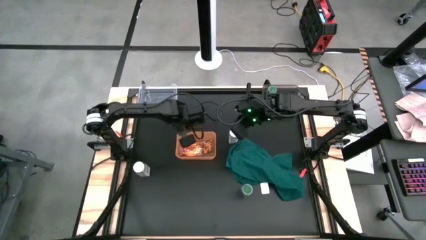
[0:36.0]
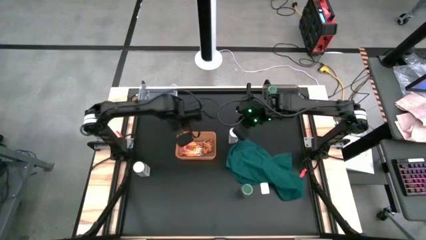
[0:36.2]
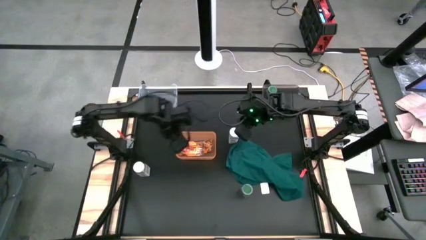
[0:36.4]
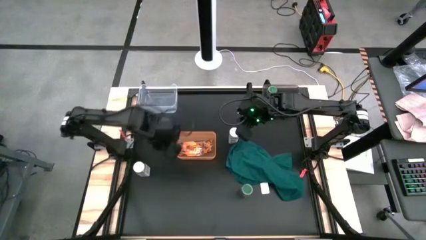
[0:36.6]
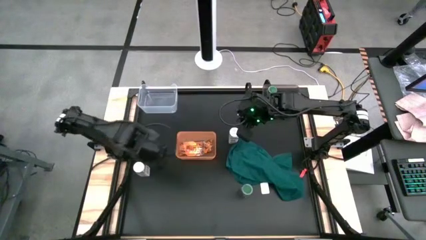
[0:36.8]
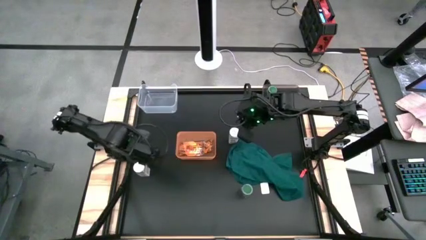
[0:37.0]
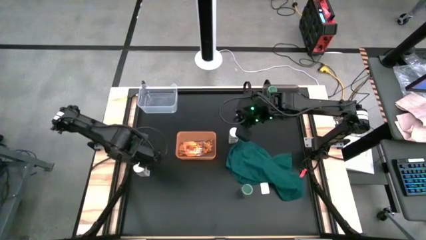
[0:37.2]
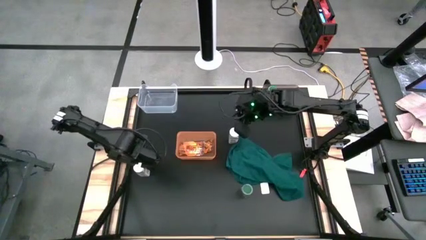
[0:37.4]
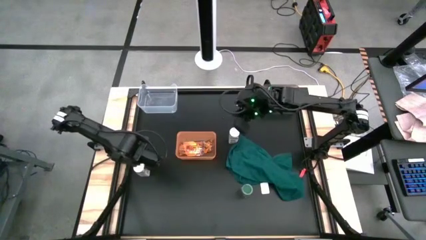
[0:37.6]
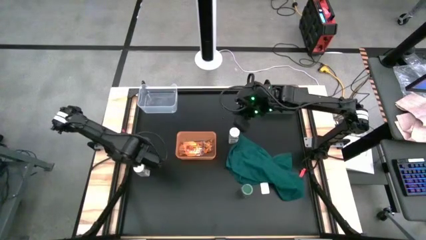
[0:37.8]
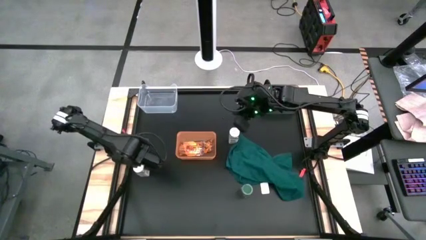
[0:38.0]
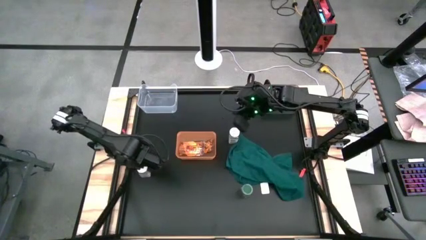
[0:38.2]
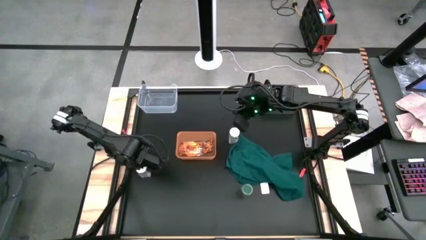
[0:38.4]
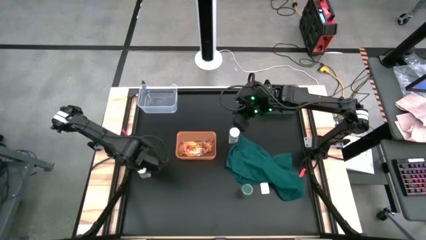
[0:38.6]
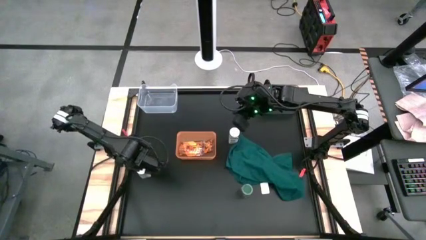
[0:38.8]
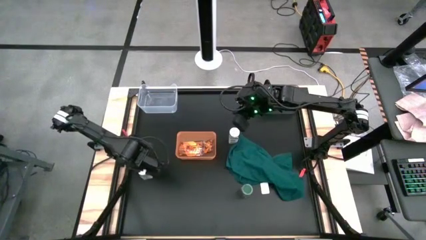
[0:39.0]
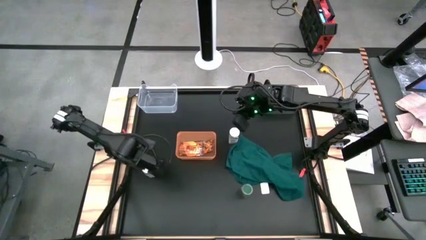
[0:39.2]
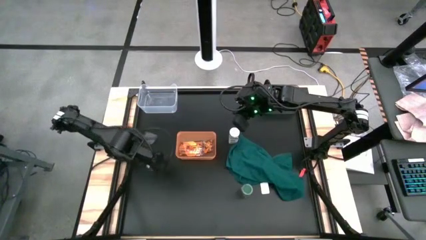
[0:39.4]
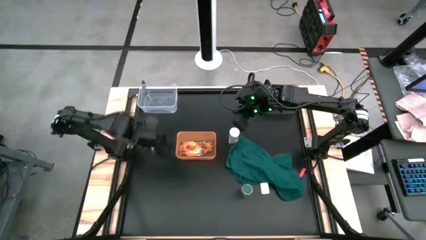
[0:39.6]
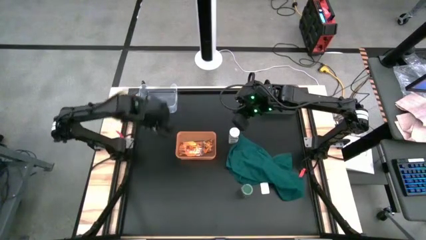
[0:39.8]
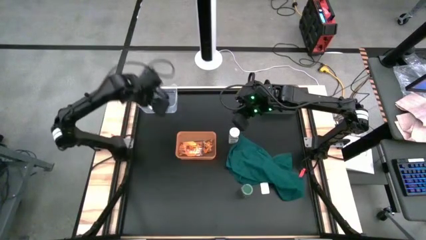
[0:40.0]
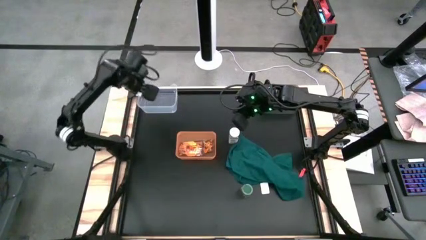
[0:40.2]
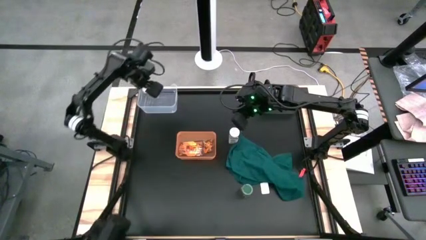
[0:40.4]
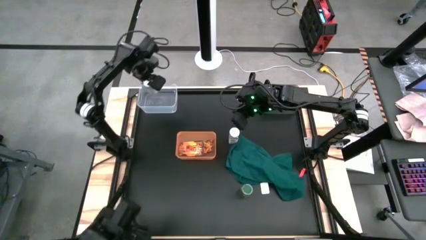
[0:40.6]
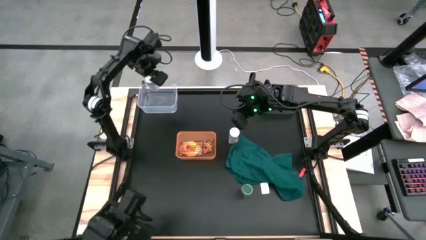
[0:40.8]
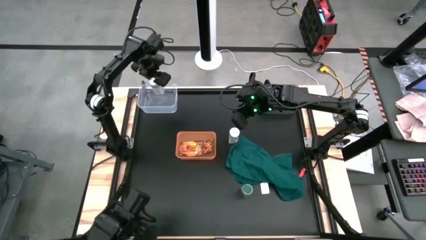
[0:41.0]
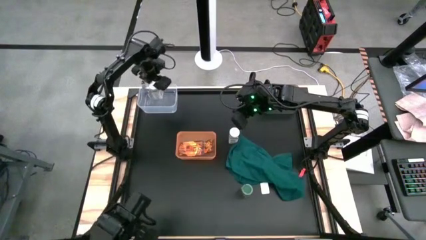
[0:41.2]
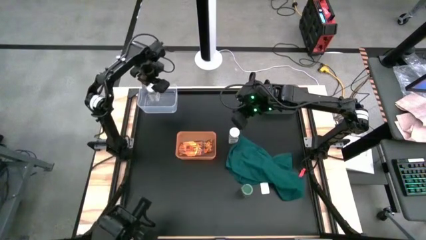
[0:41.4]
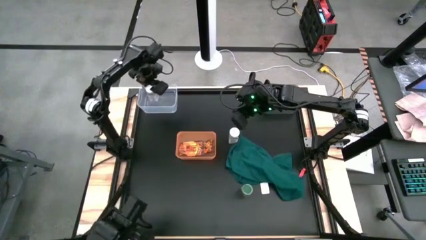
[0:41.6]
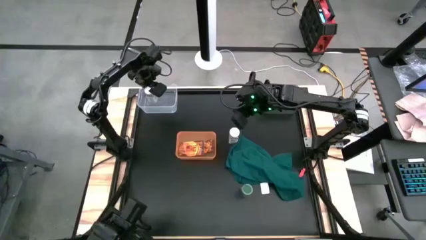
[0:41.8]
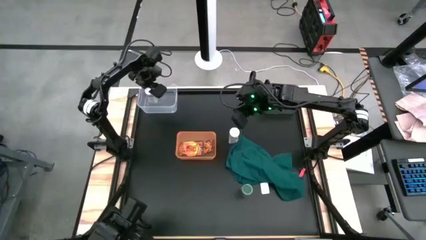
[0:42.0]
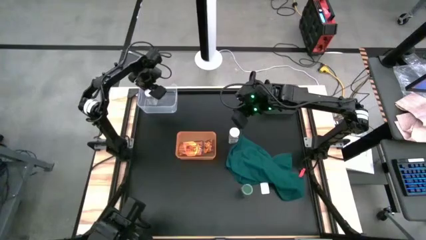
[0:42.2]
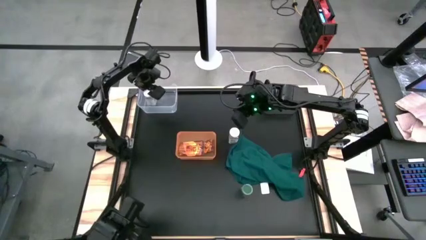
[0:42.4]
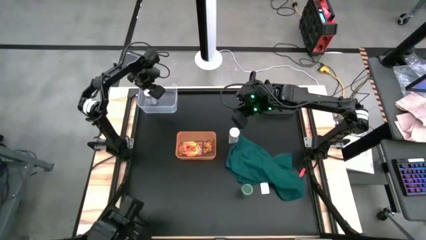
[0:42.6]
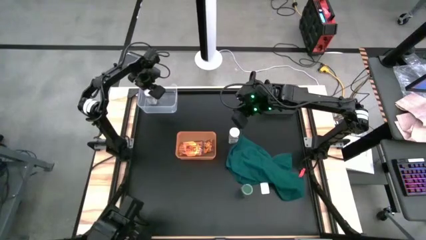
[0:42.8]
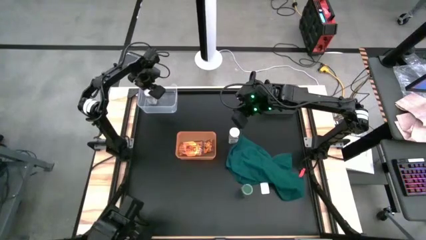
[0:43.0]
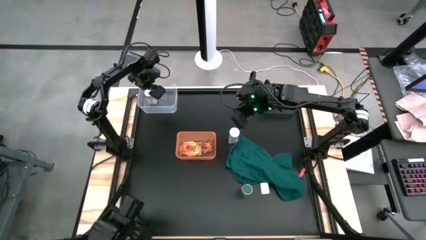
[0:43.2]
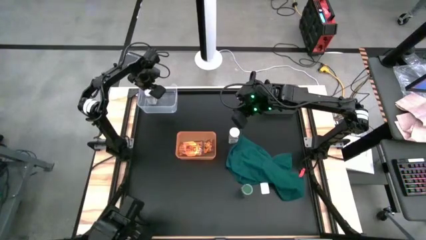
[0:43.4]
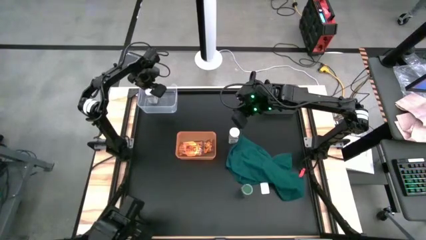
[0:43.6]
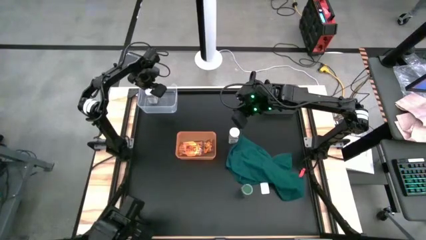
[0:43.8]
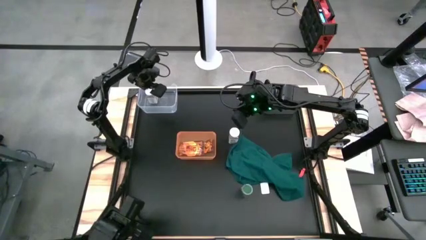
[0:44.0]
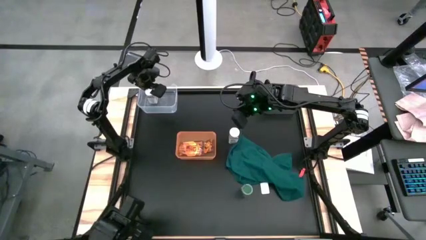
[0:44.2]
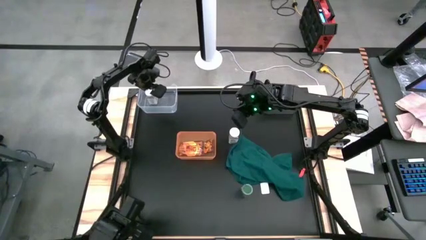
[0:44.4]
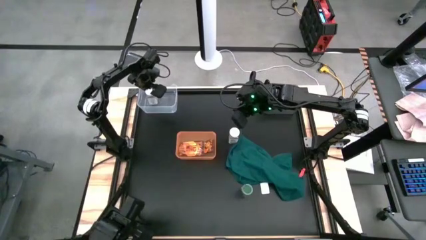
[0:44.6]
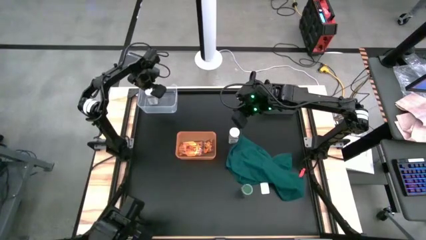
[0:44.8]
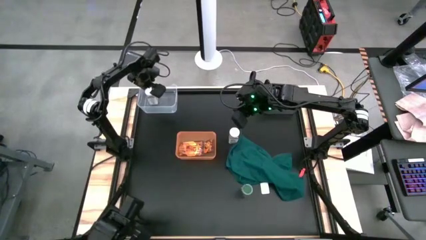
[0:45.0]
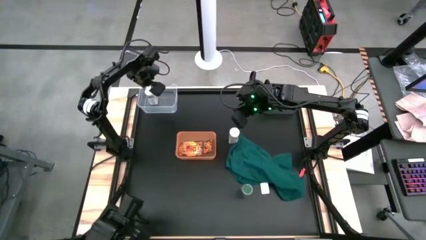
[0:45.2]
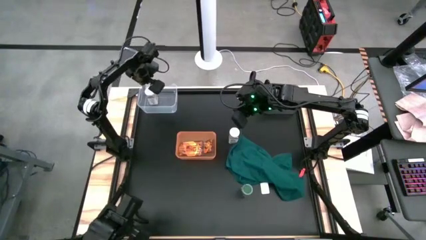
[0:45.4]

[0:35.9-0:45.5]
Task: Sort spices by type
Put the left white seasoning bottle into the transparent bin

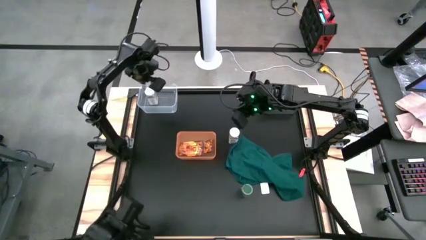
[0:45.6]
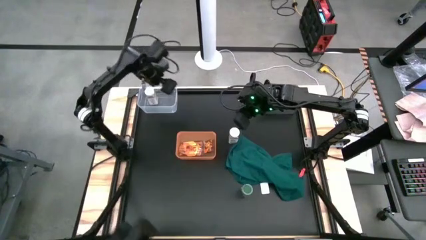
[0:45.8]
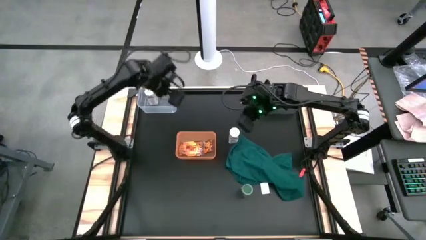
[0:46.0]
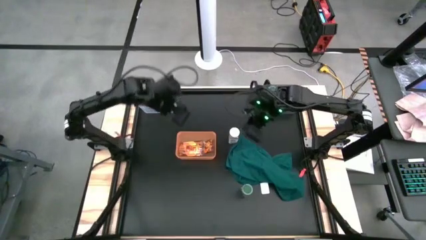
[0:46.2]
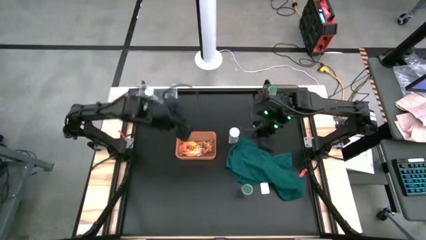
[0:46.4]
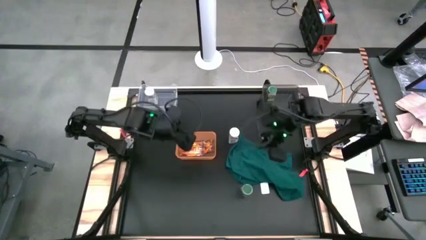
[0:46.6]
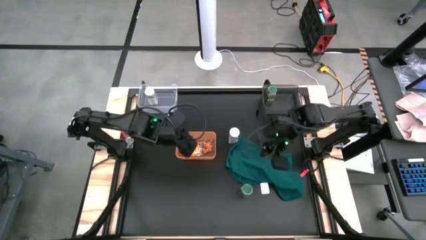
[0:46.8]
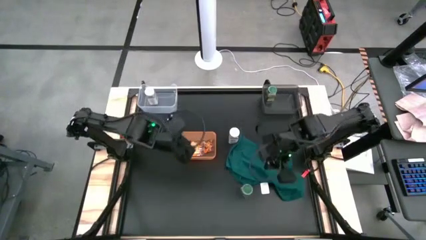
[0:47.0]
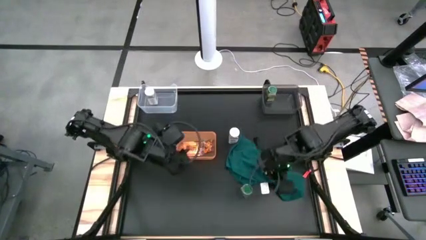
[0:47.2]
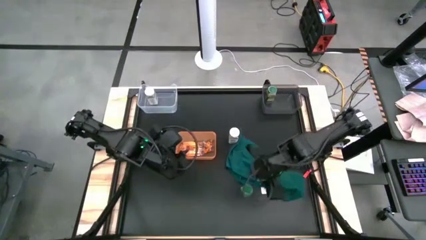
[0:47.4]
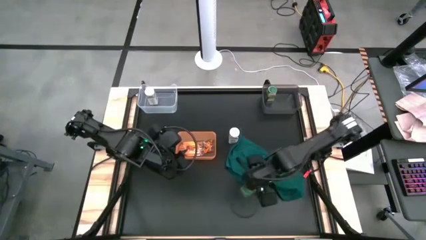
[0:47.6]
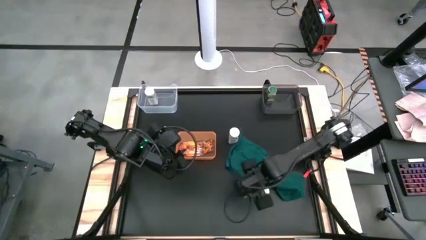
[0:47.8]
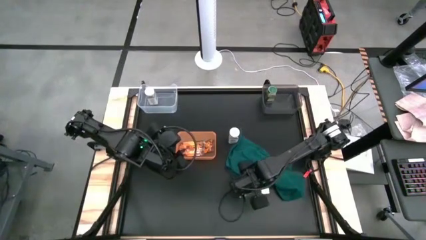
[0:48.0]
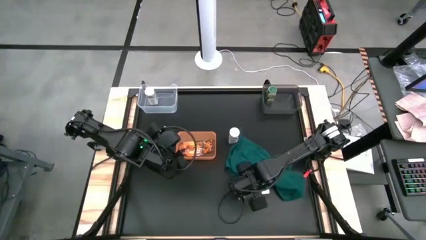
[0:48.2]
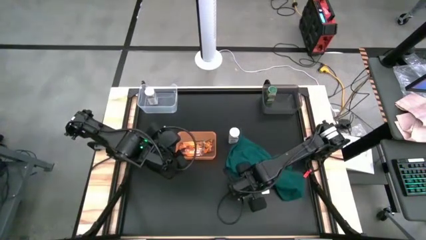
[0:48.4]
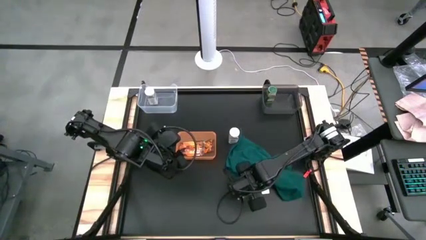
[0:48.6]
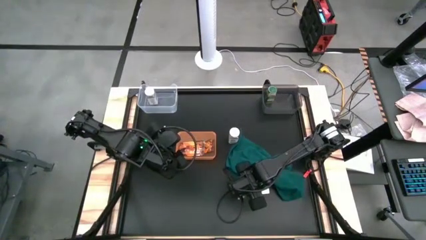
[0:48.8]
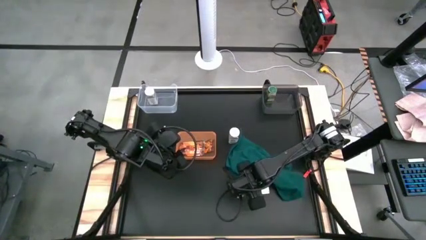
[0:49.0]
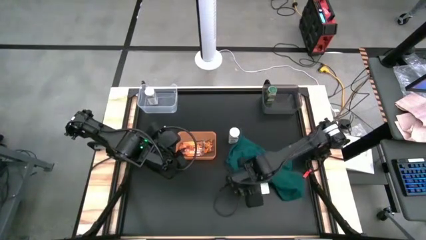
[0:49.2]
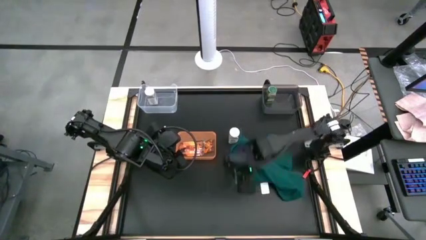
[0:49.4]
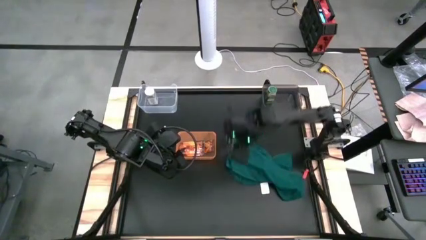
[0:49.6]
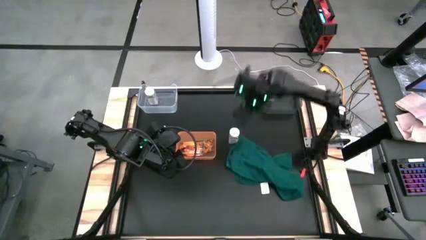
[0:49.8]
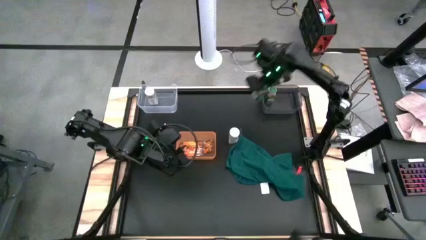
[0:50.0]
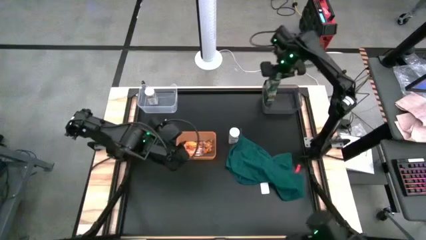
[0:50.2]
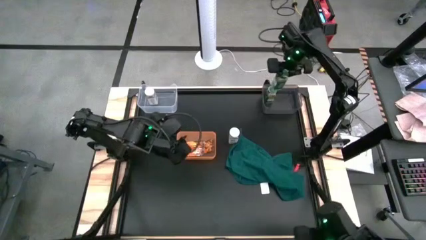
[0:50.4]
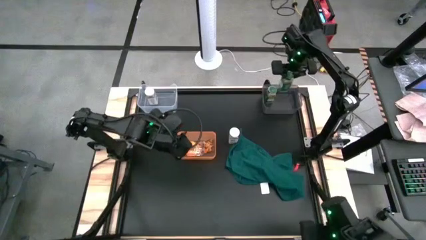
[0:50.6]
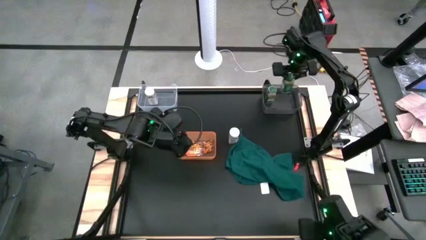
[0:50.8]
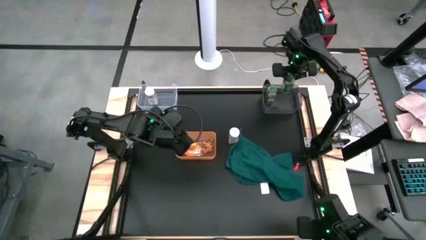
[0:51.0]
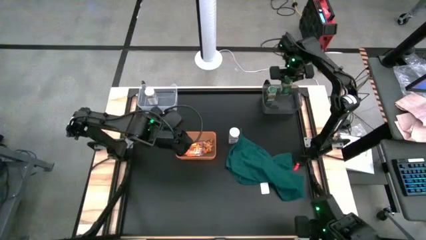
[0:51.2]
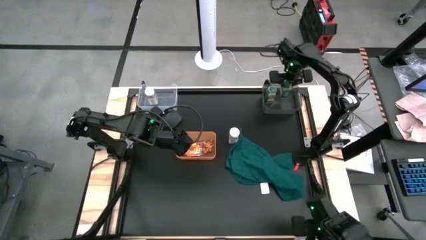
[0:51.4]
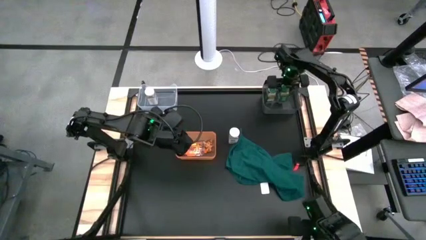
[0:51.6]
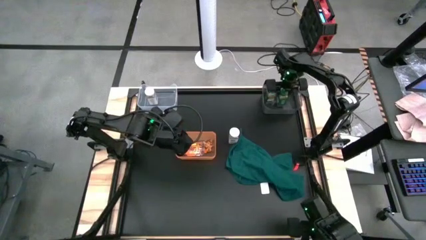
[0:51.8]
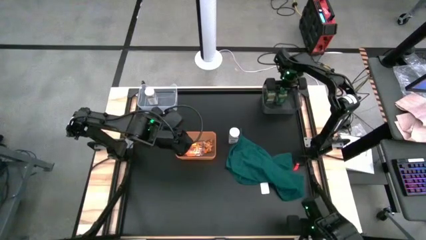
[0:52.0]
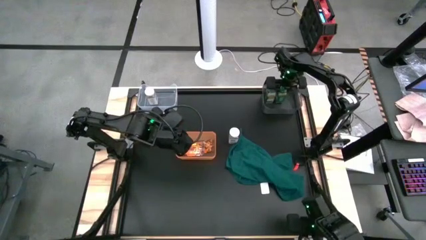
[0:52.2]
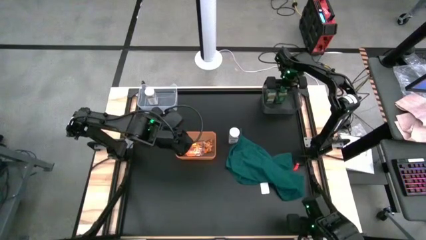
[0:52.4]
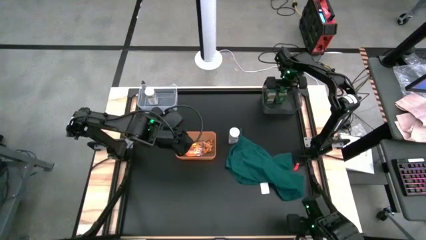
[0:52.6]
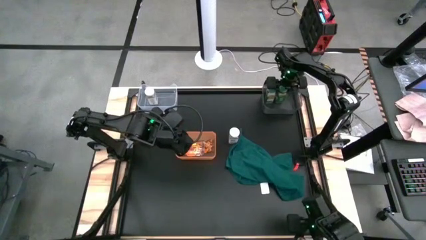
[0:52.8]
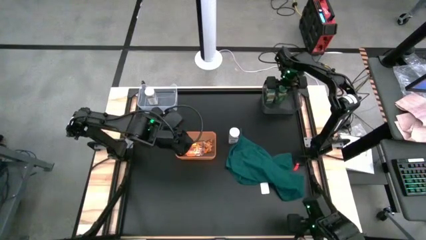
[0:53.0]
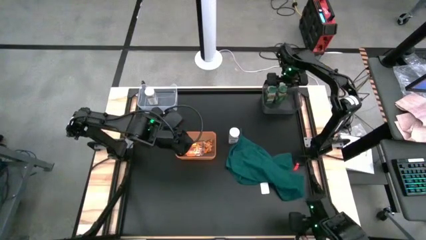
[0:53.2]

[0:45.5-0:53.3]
Put the green seasoning bottle into the black bin
